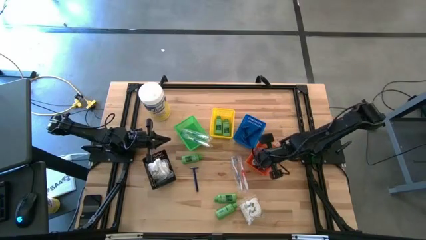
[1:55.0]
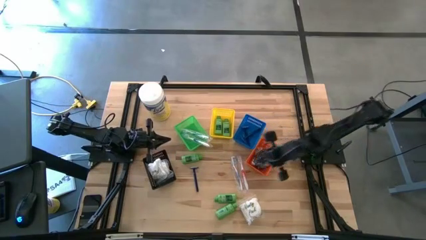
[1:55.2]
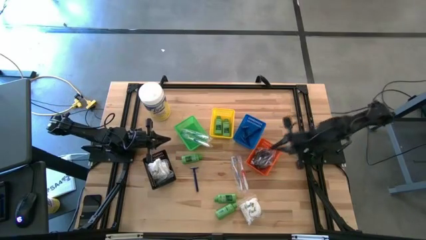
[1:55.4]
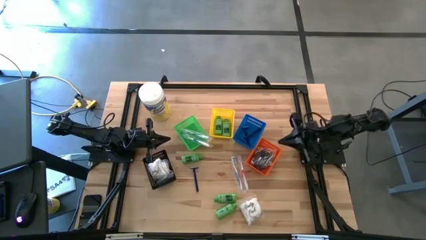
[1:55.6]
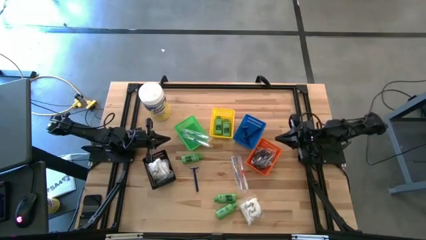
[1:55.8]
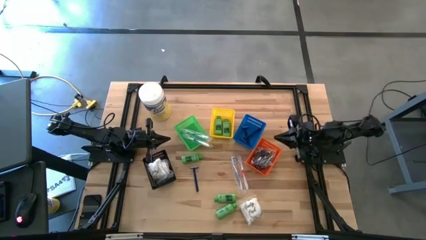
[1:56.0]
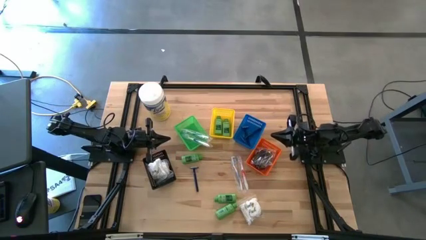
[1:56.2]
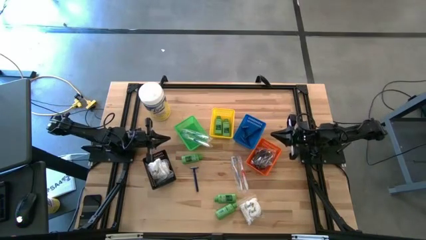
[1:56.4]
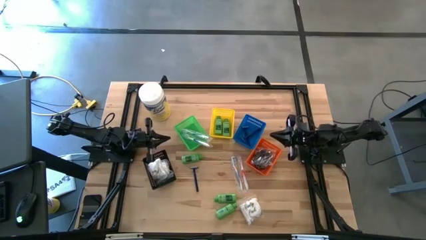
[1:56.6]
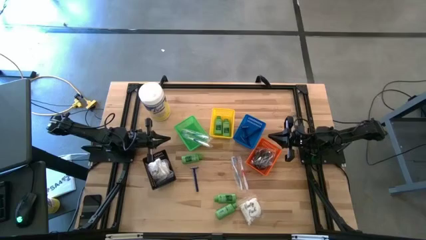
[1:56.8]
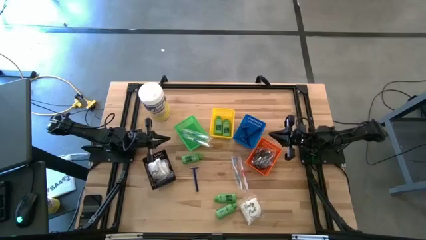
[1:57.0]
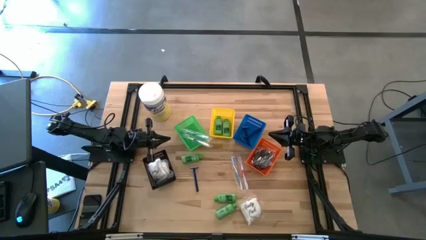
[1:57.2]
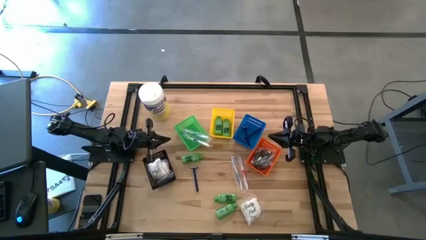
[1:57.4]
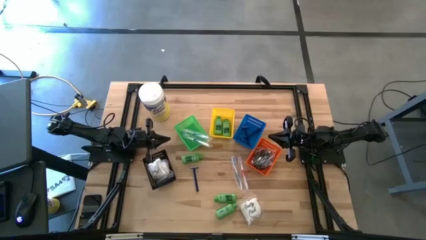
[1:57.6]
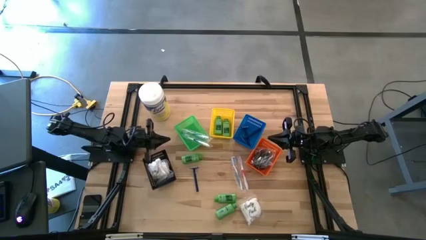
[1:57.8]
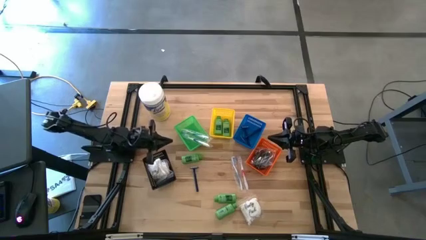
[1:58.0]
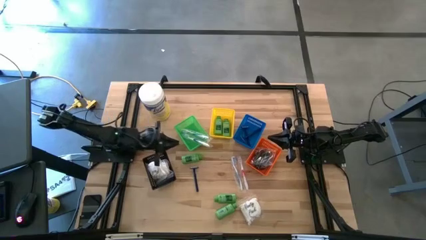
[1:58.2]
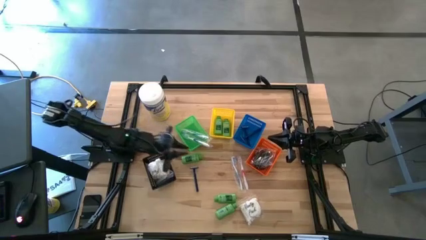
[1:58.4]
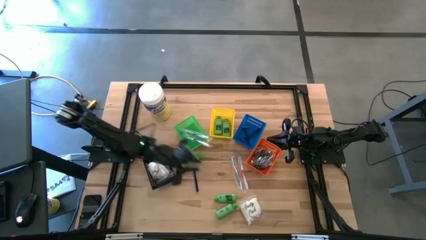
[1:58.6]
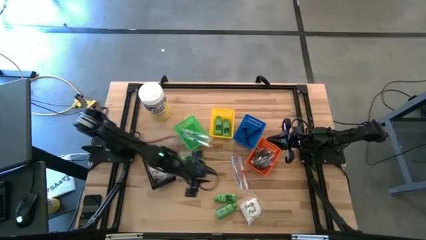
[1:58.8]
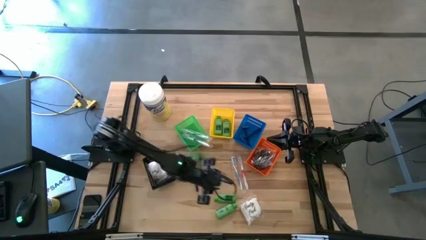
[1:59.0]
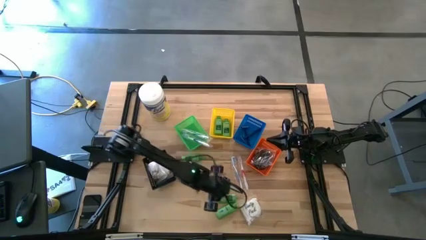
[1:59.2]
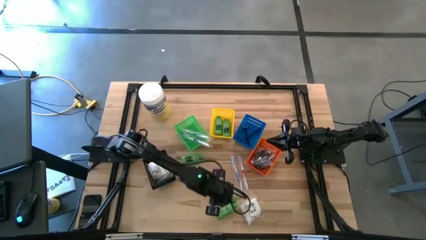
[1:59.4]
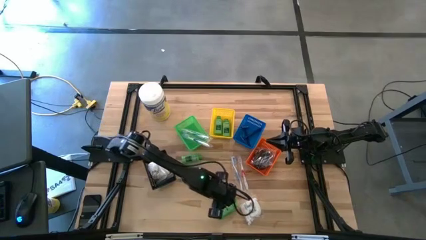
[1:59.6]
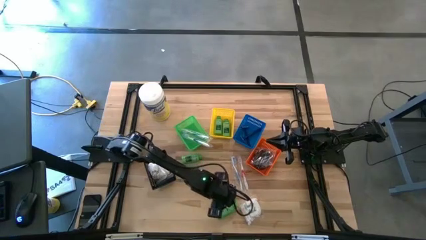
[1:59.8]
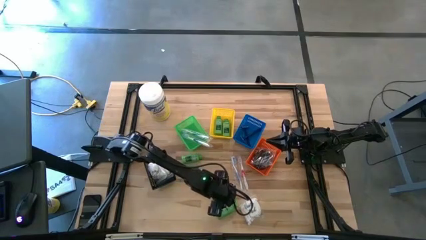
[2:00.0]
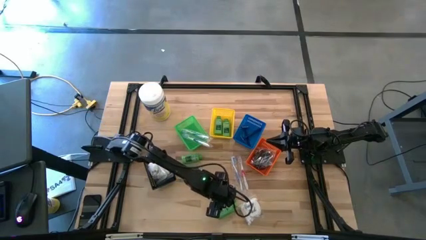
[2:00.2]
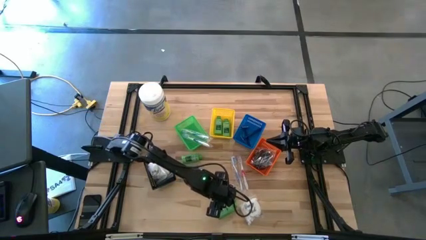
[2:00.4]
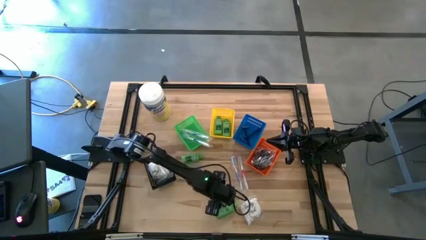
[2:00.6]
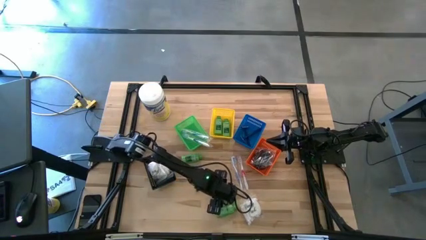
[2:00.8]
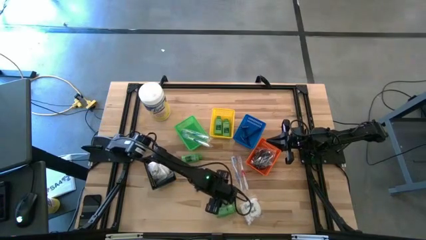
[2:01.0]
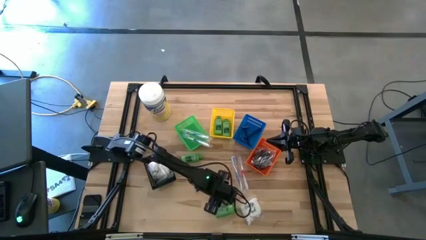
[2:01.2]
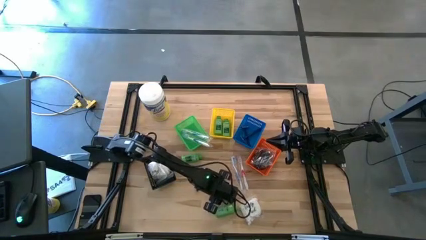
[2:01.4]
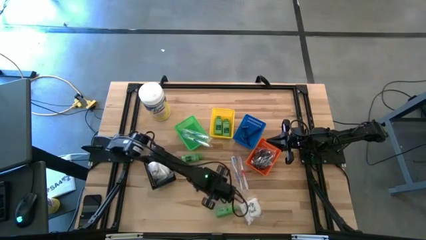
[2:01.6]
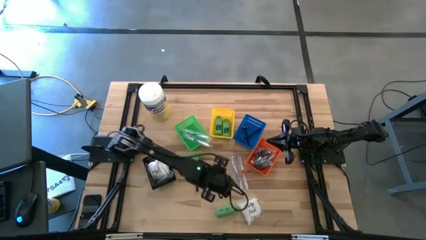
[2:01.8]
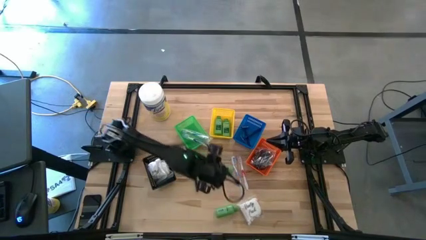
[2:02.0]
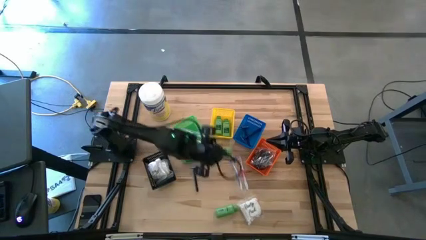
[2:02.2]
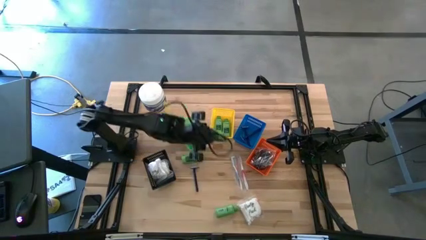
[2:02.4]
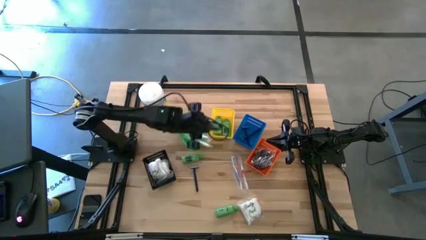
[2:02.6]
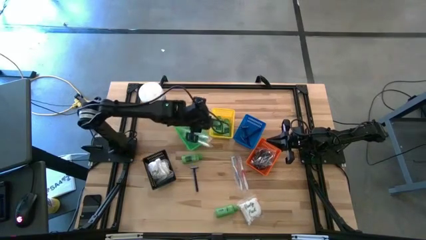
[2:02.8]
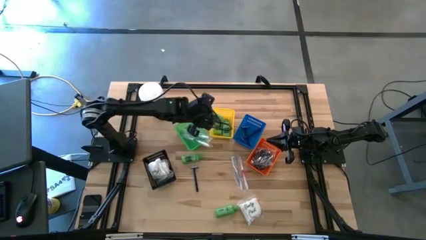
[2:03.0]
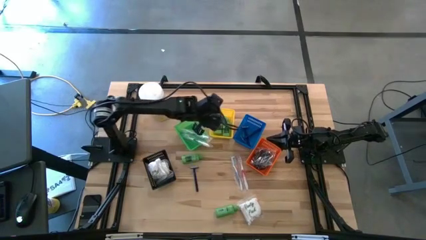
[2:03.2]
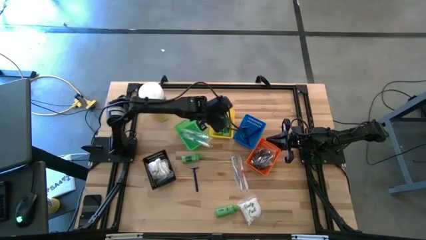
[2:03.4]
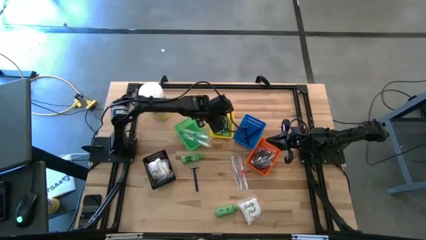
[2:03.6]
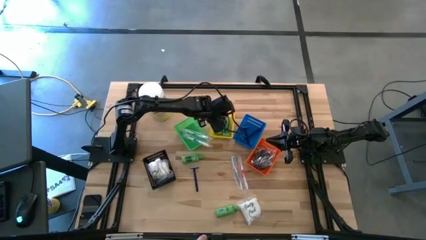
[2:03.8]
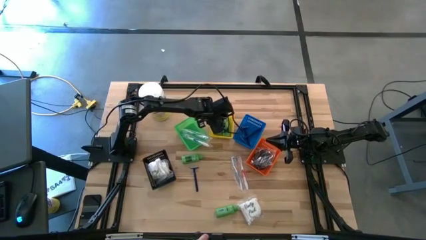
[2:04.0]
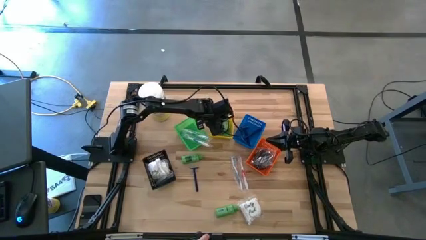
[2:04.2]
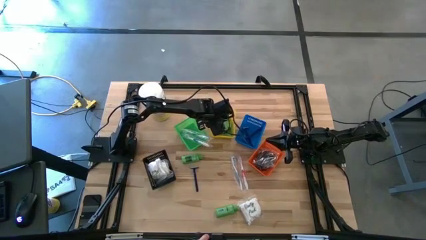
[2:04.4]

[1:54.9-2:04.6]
Task: Pick & Place Travel size toiletries
Put the shampoo bottle into the yellow bin
